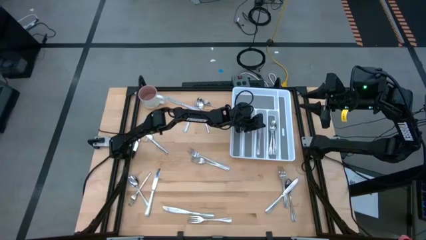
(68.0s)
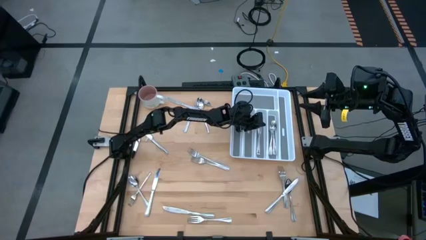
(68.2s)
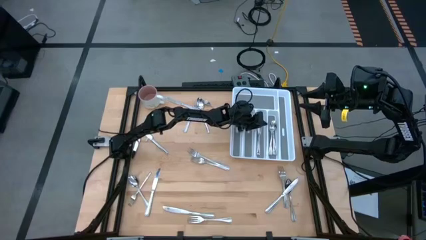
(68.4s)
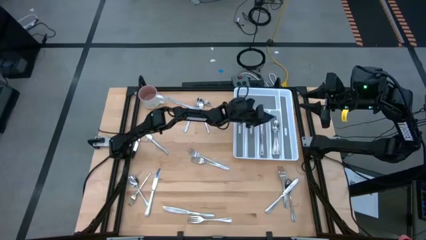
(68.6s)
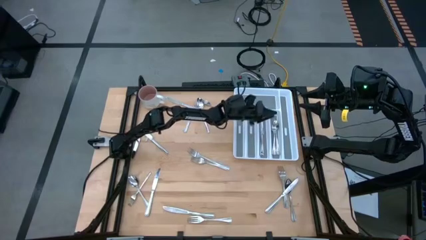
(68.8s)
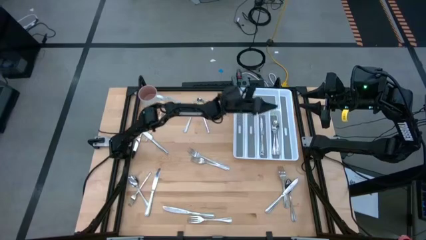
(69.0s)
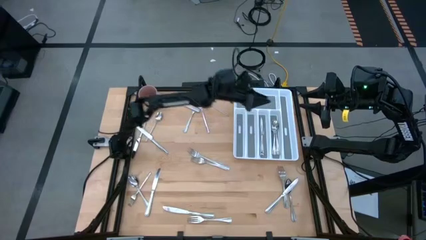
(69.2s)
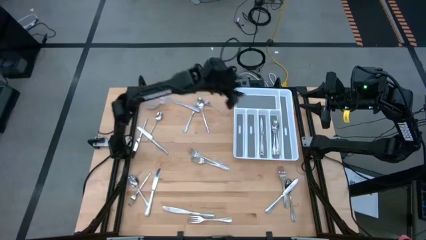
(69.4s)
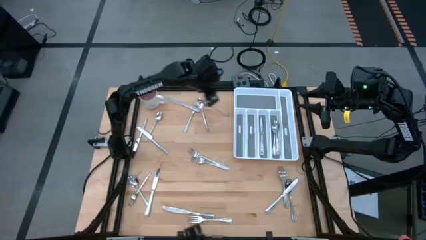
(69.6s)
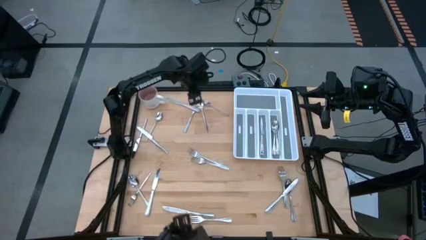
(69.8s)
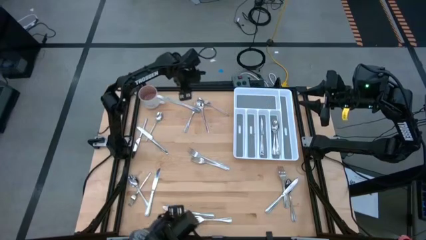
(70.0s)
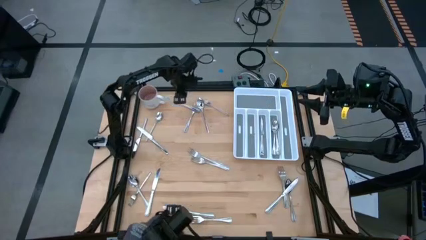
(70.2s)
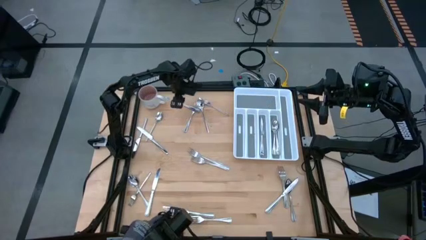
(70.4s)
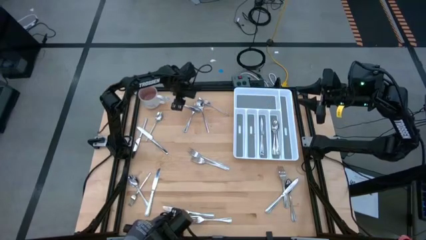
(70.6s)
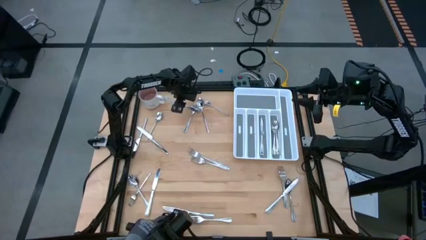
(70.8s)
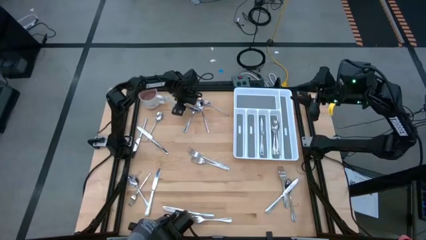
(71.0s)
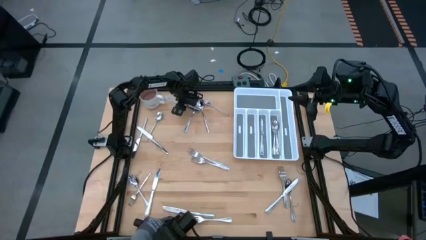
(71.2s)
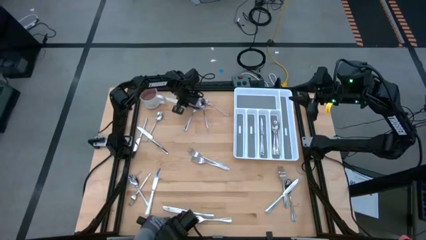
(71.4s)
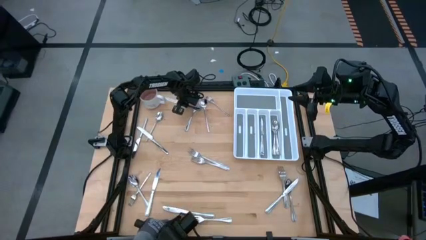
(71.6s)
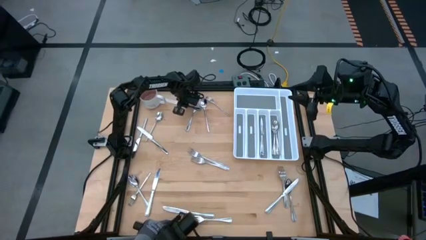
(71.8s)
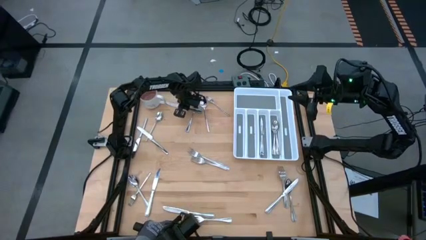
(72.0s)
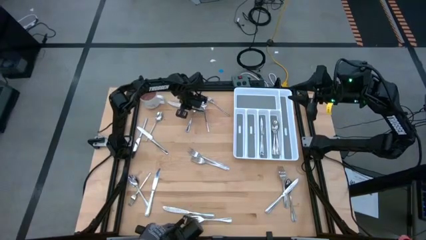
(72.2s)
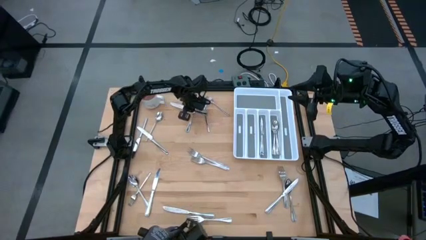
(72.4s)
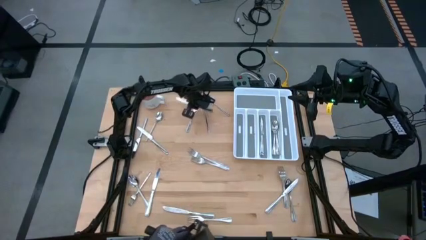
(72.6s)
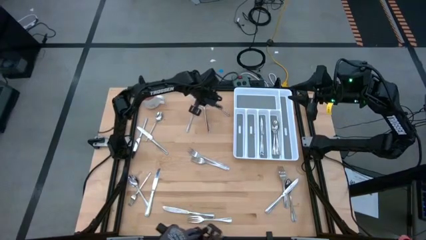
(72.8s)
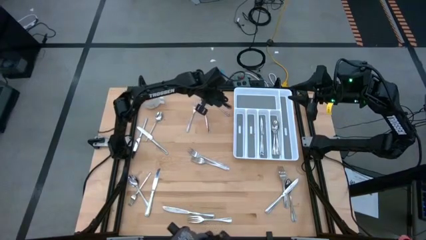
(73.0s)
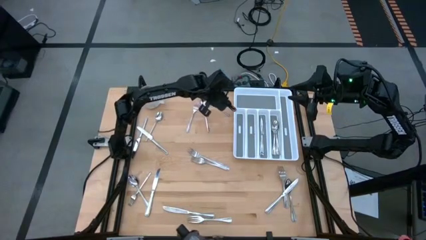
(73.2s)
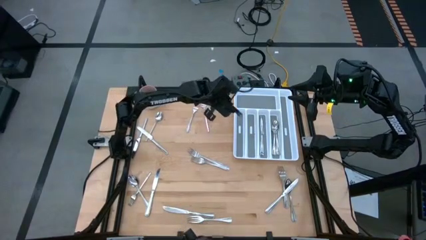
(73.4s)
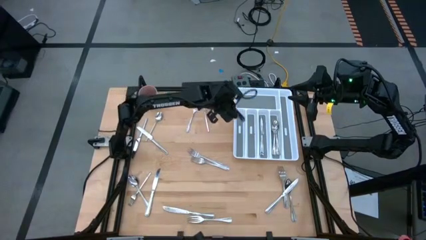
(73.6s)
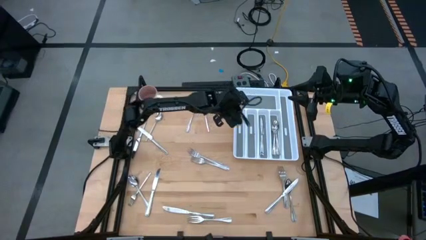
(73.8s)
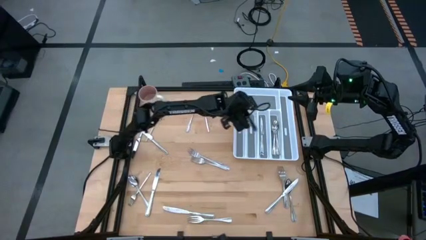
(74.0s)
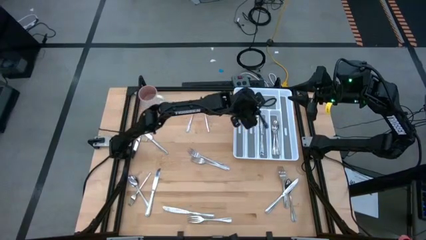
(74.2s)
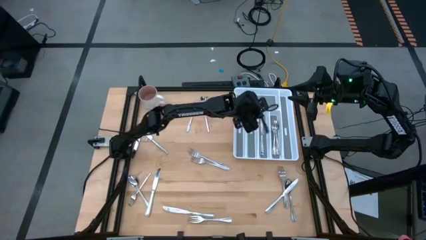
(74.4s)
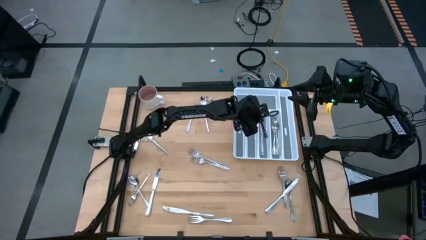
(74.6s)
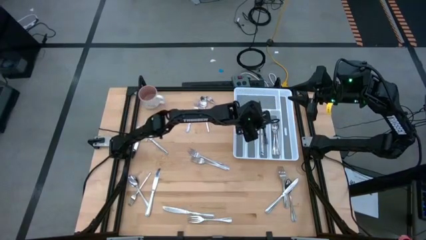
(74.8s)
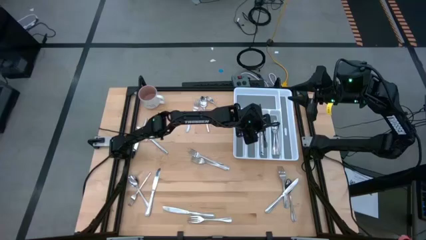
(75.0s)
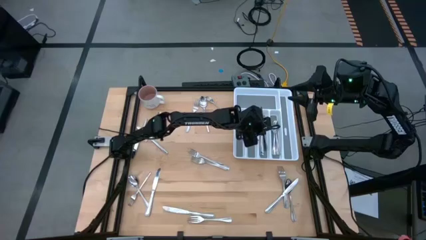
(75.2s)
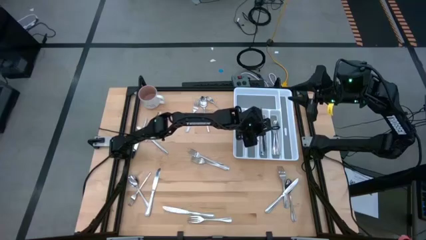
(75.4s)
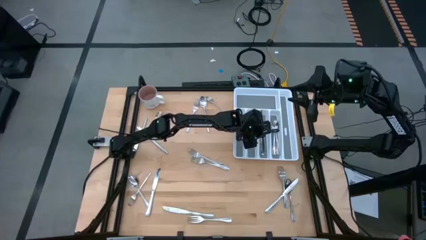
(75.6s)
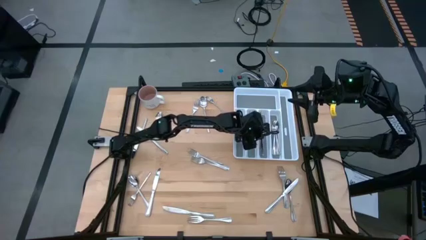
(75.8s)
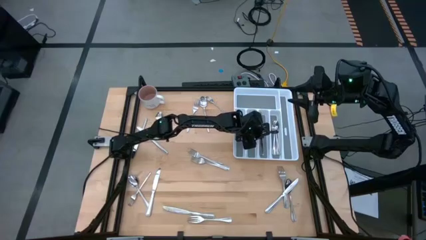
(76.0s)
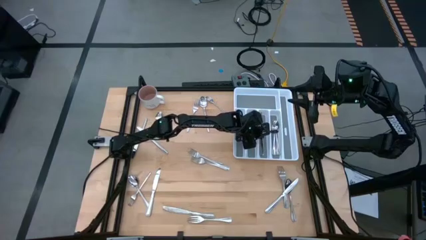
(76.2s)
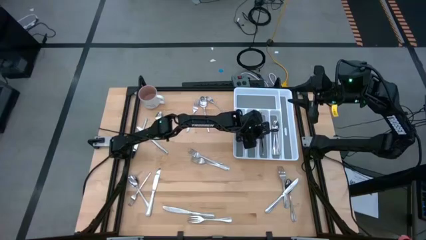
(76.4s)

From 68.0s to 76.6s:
Task: Sort silverware
Put the silver table knife into the silverware tray

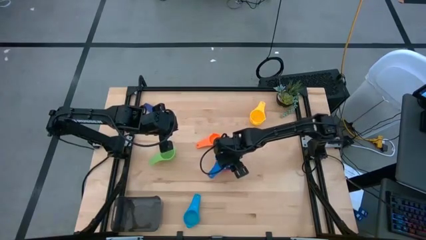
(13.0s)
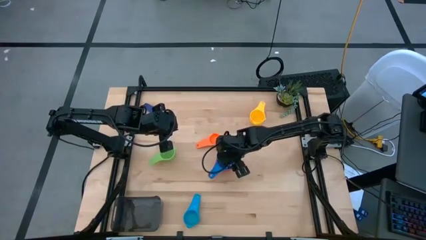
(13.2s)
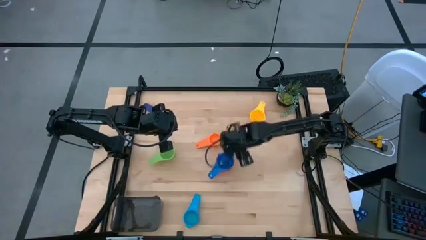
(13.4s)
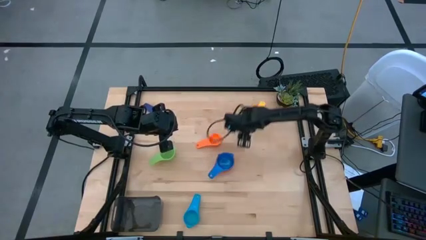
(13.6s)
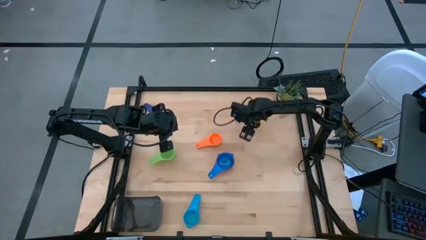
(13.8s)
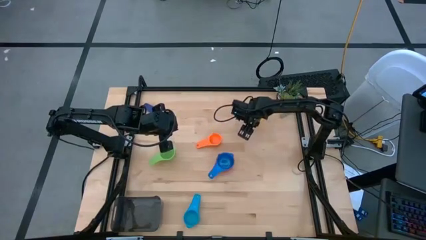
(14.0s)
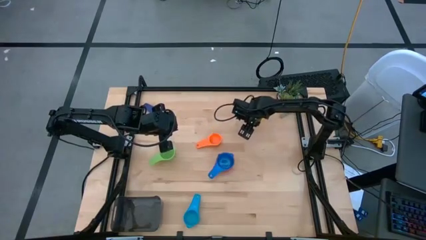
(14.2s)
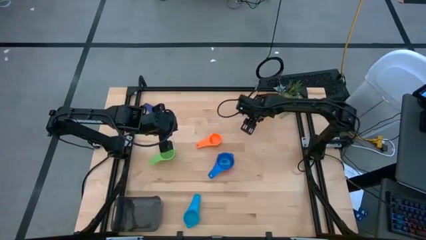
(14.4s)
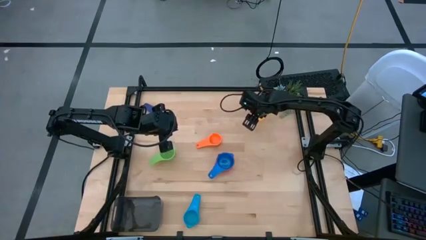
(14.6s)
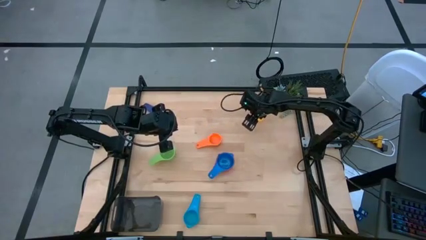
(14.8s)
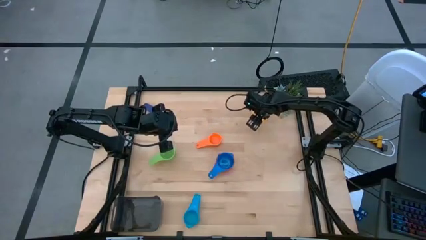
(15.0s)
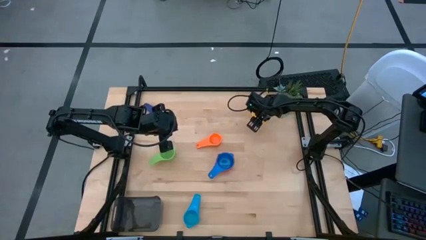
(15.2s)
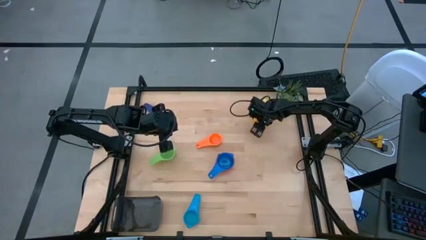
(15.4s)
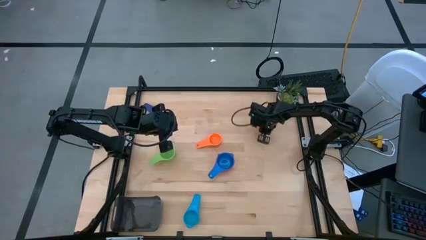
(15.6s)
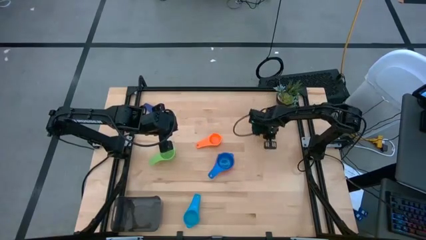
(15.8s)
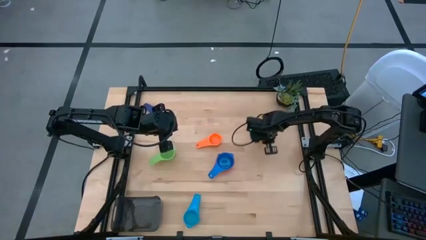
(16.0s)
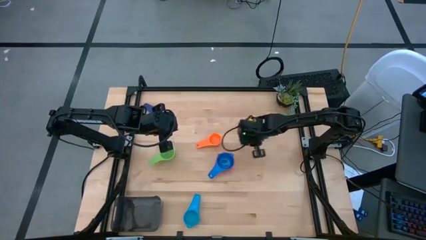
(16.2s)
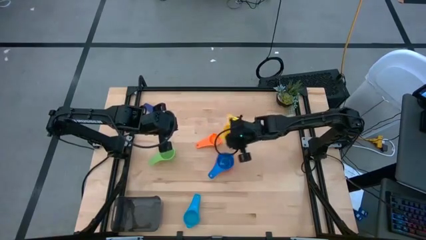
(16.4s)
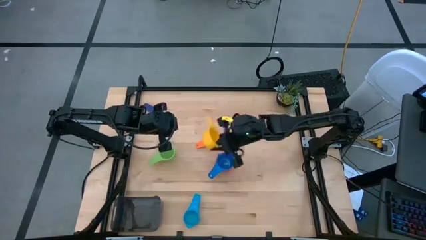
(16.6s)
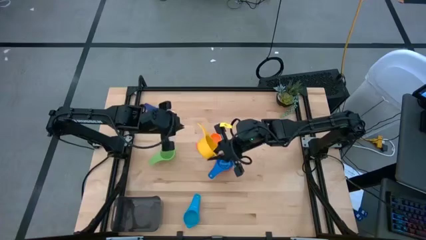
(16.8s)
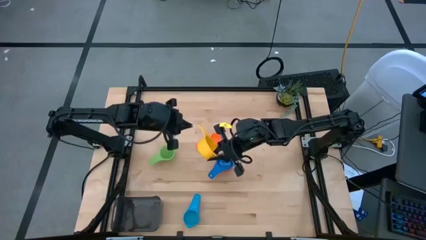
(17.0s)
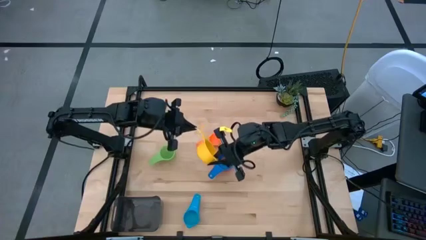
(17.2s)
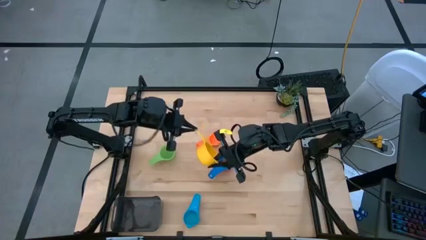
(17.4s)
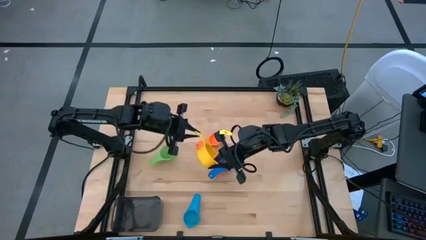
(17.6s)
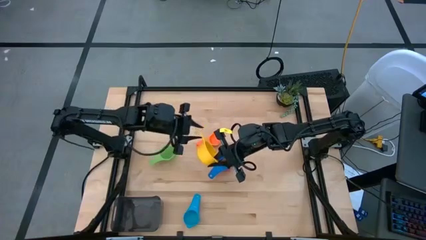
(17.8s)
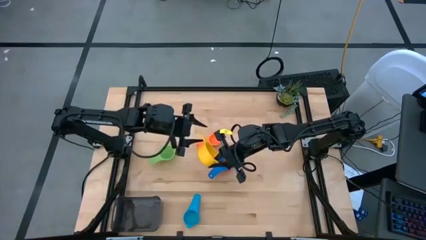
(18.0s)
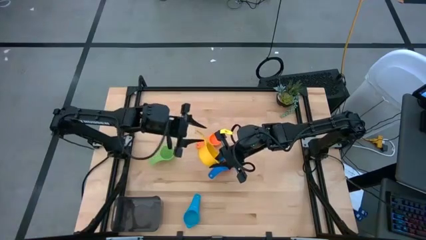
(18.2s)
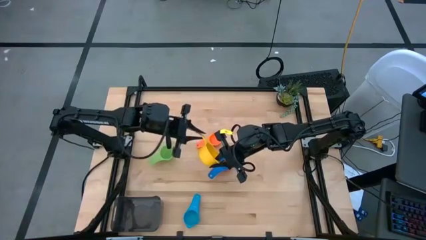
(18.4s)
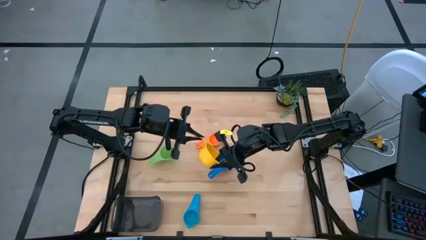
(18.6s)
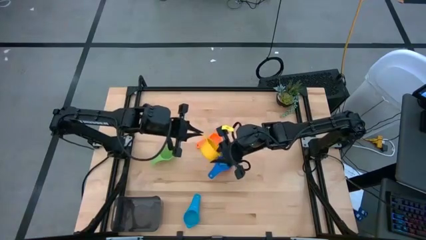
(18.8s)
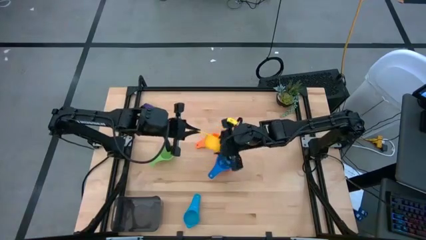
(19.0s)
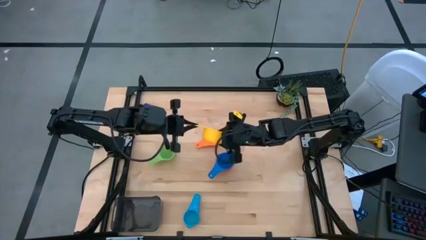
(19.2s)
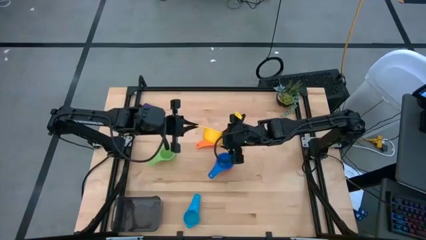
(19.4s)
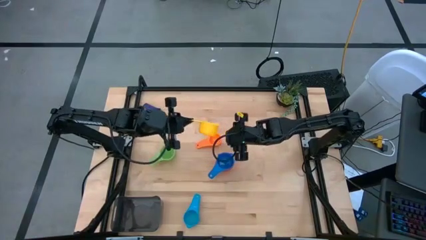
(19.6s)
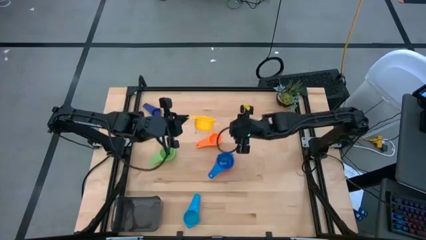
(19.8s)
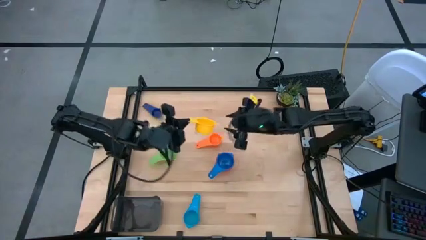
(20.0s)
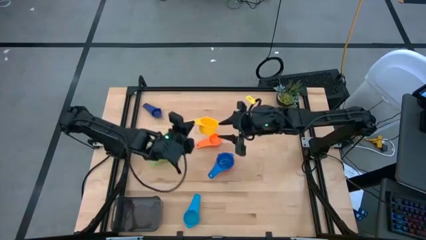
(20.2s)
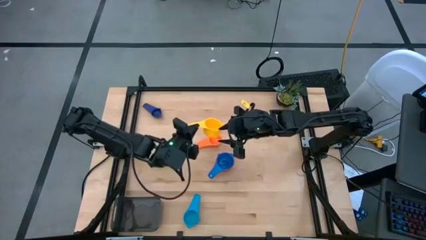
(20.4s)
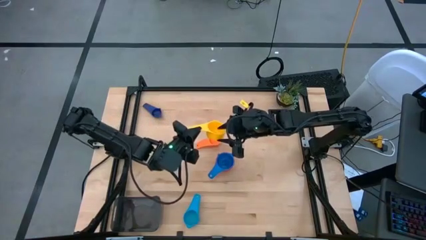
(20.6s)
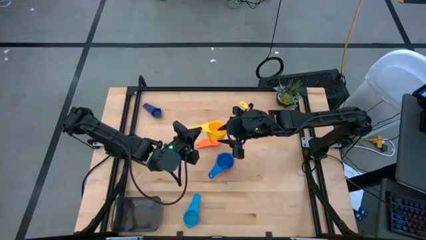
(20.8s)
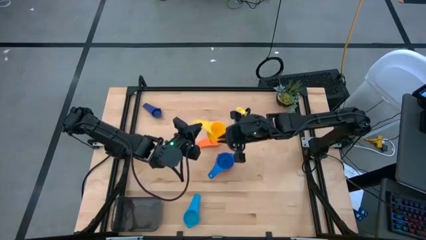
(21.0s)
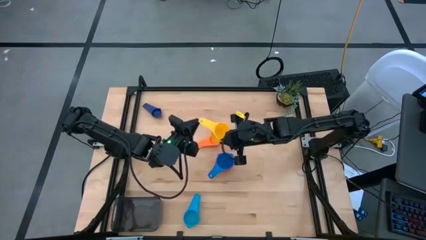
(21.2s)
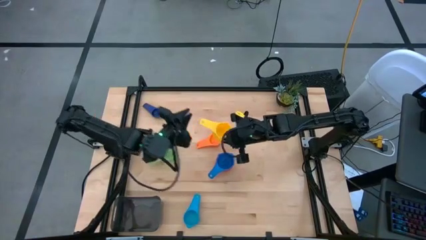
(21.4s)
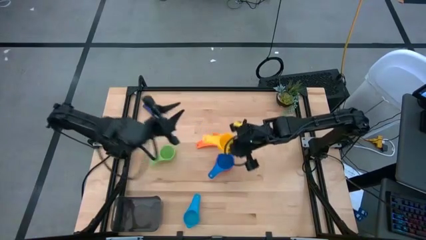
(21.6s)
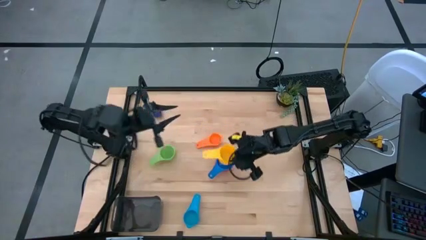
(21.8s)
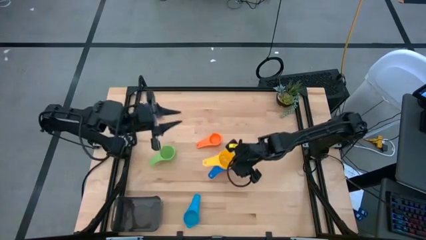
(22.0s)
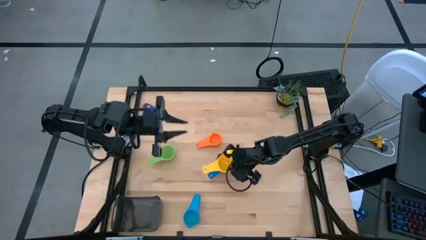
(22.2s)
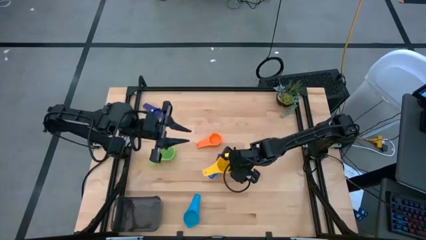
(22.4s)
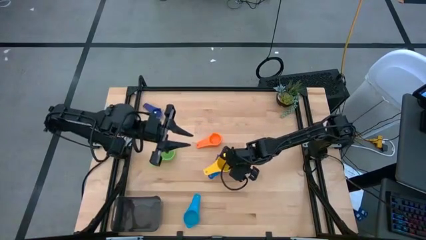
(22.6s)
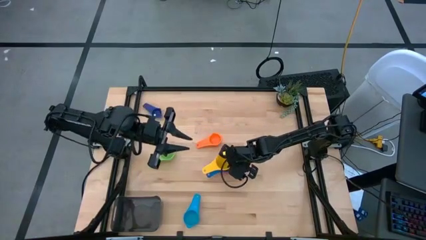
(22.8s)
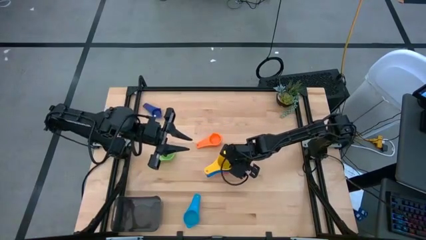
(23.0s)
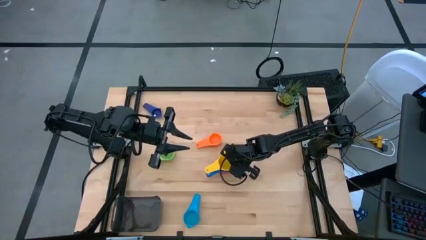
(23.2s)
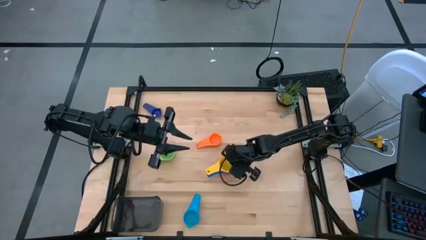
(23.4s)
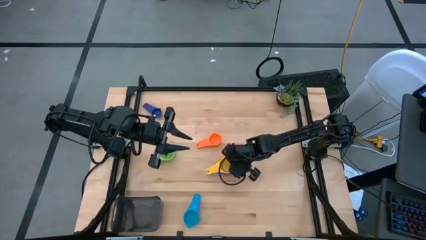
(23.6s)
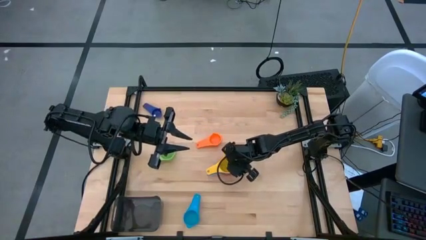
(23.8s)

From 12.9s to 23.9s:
Task: Nest measuring cups in basket
Stack the yellow measuring cup on top of the blue measuring cup
